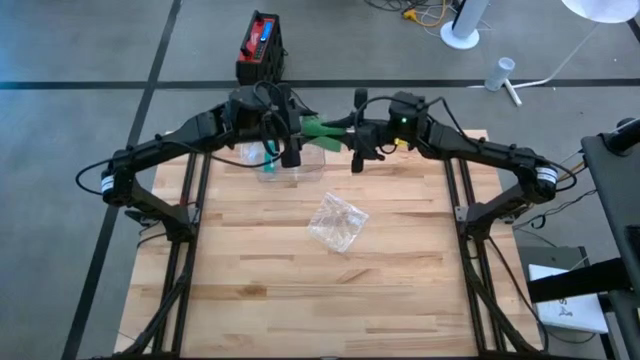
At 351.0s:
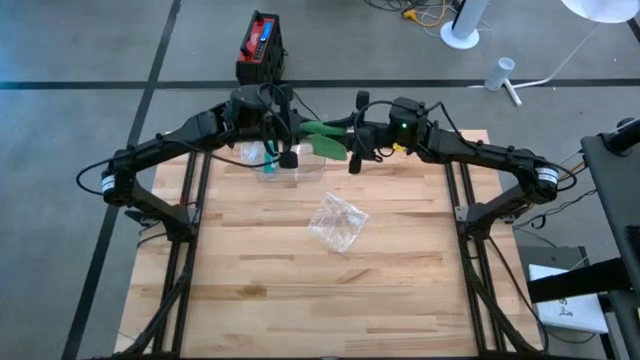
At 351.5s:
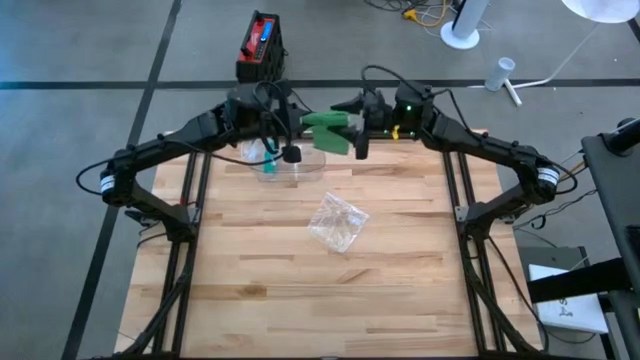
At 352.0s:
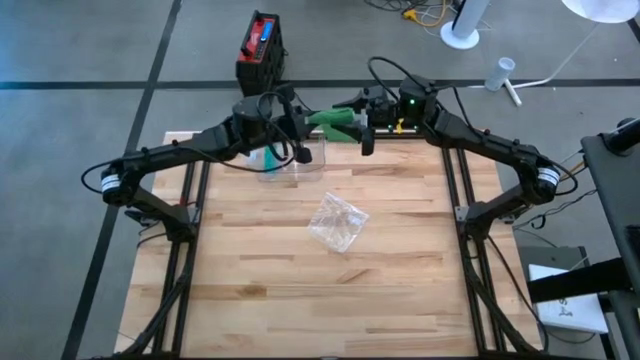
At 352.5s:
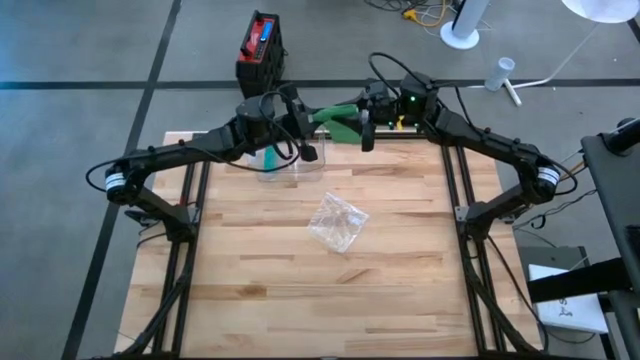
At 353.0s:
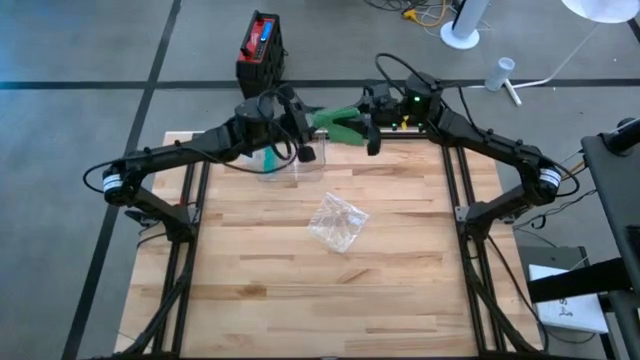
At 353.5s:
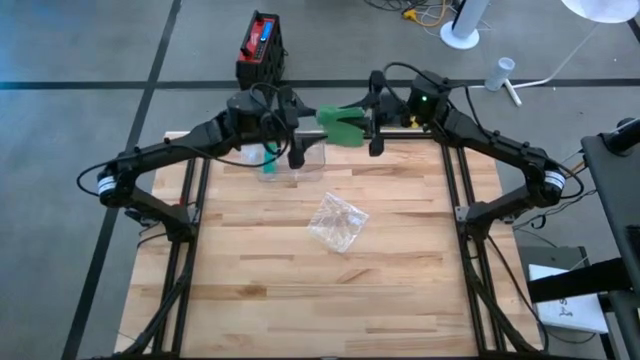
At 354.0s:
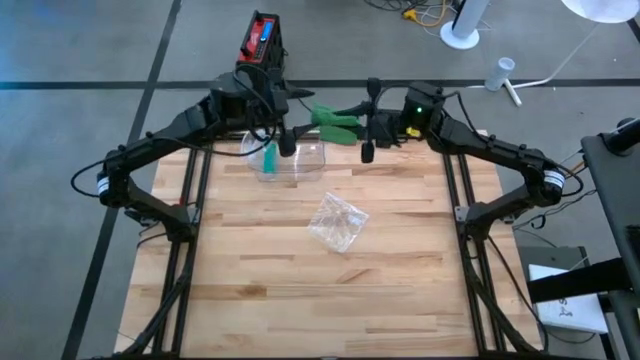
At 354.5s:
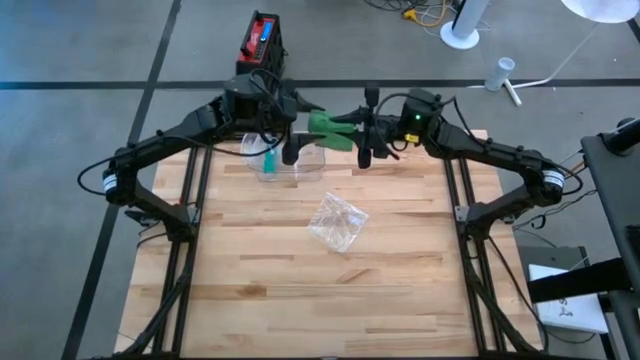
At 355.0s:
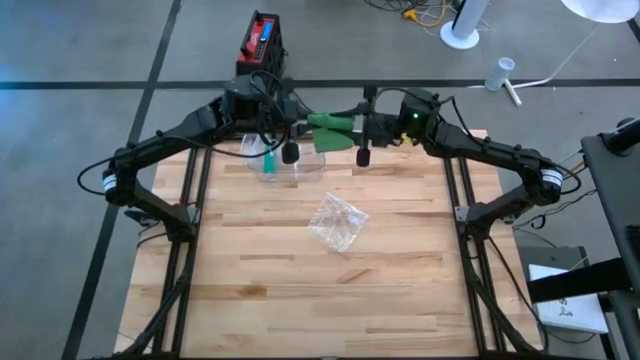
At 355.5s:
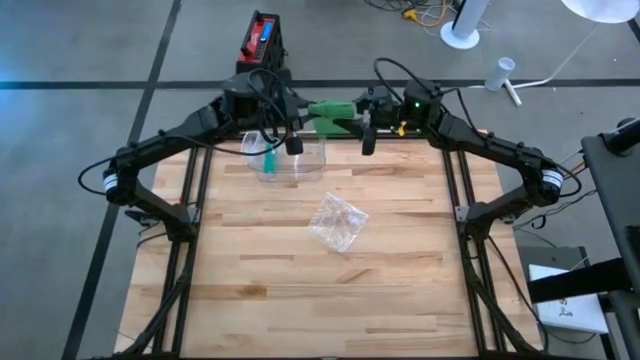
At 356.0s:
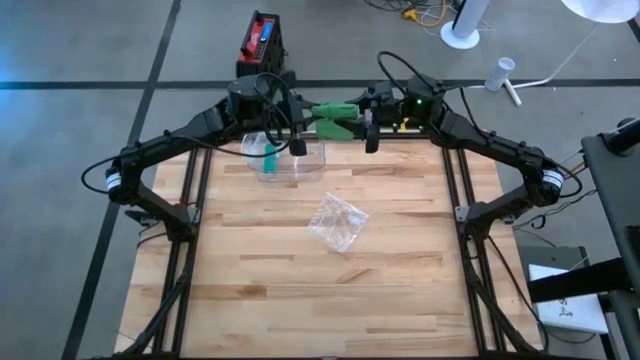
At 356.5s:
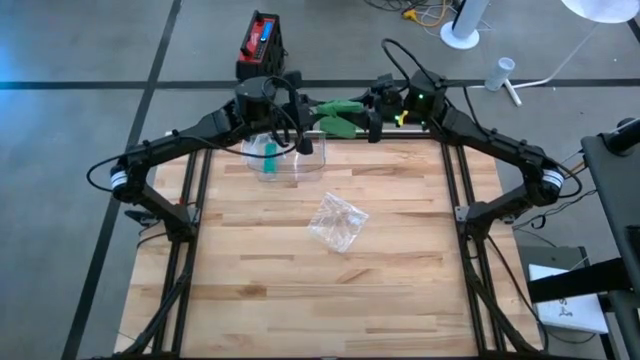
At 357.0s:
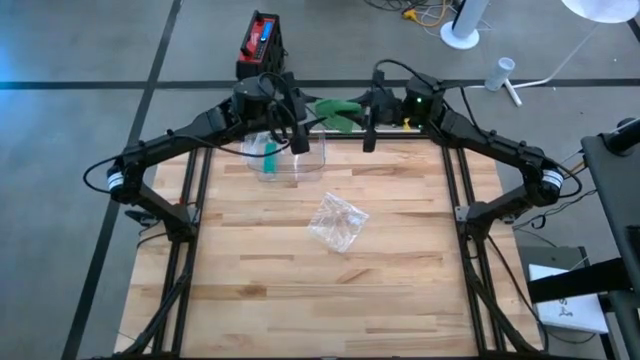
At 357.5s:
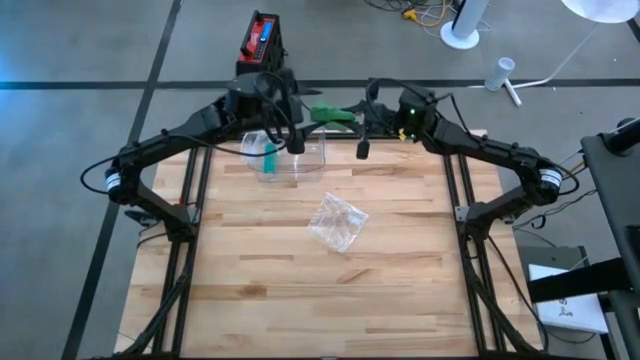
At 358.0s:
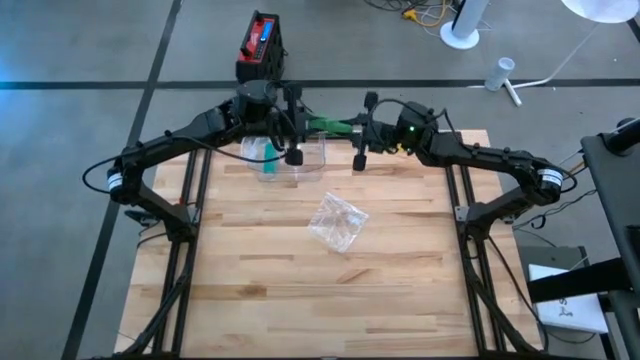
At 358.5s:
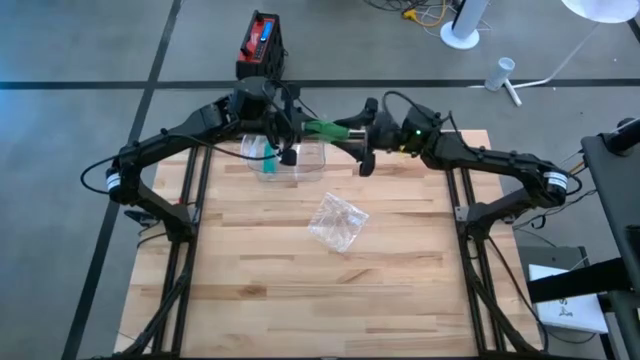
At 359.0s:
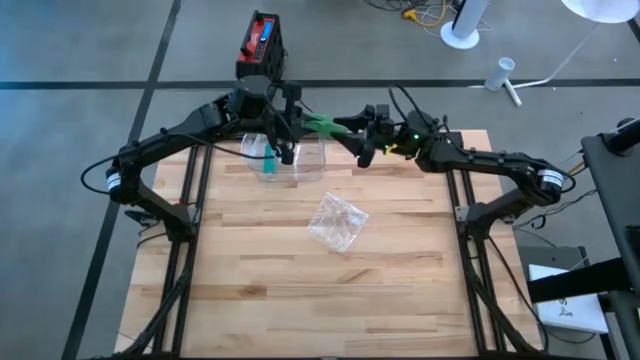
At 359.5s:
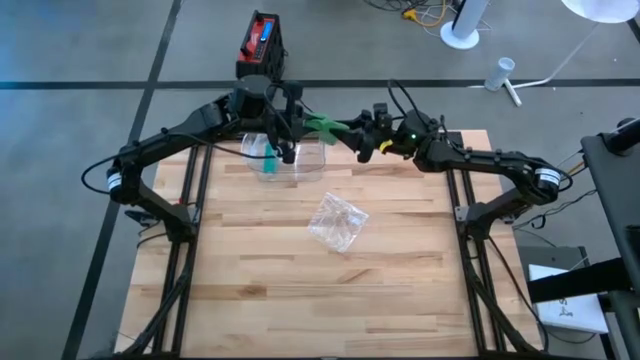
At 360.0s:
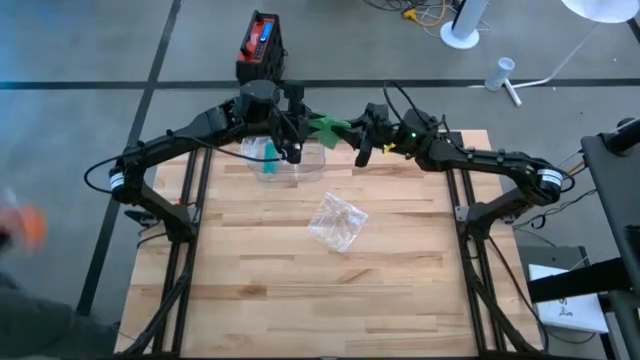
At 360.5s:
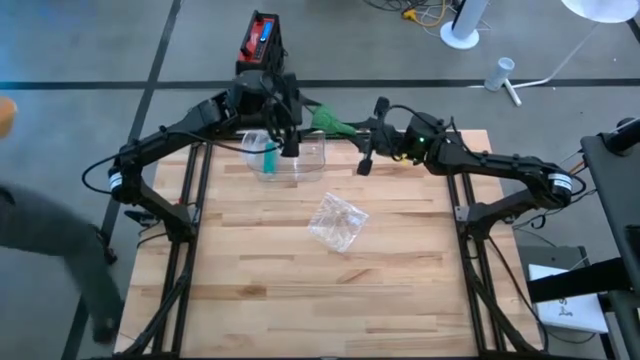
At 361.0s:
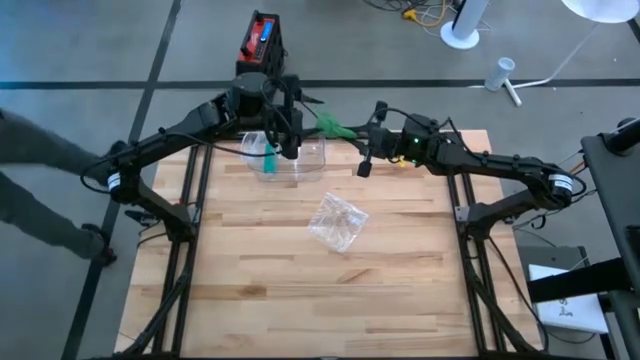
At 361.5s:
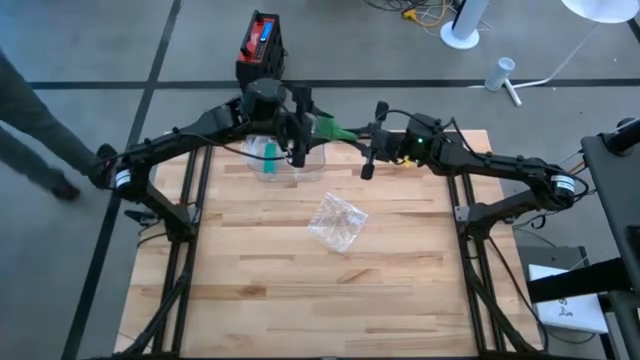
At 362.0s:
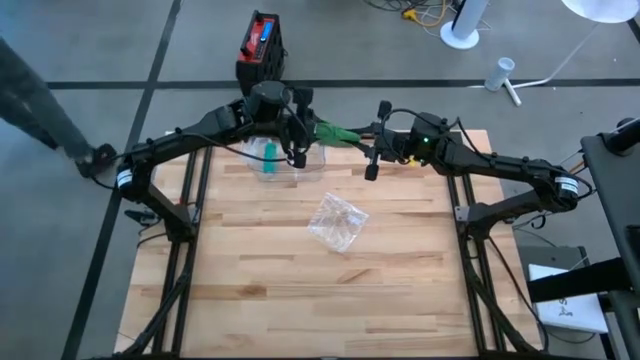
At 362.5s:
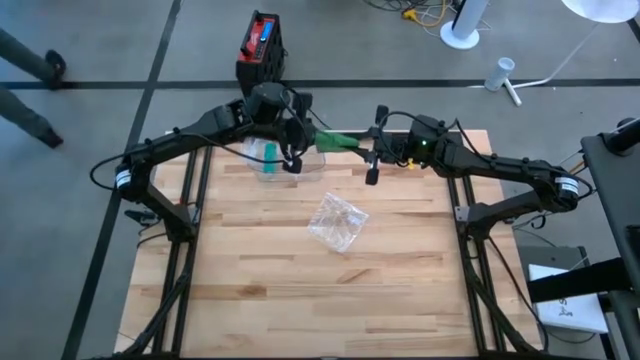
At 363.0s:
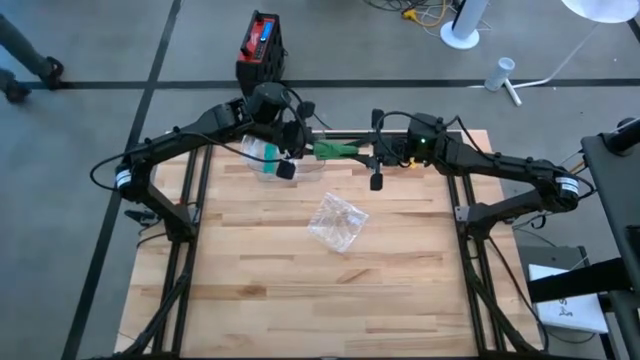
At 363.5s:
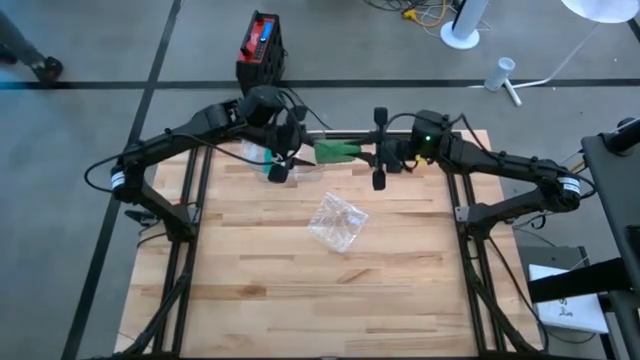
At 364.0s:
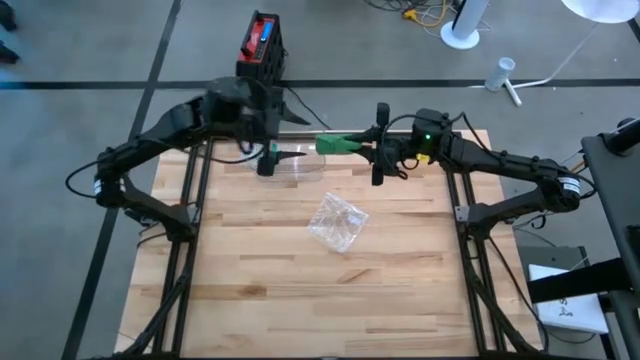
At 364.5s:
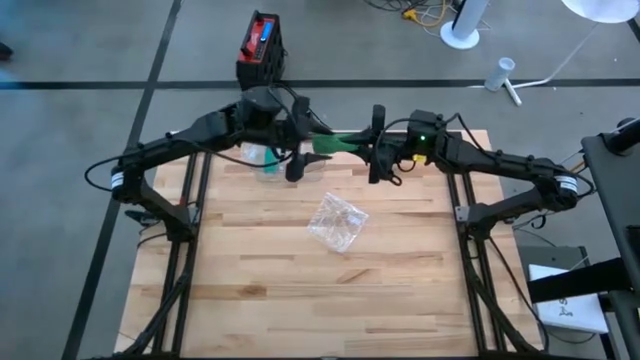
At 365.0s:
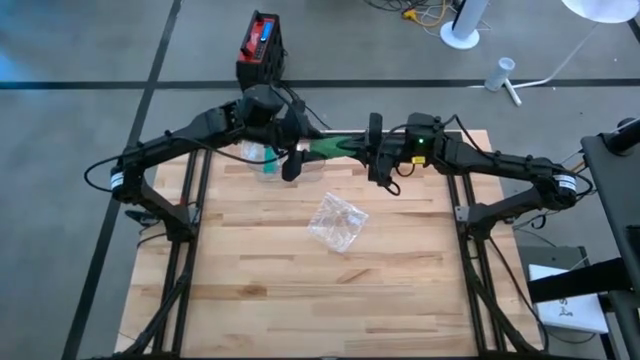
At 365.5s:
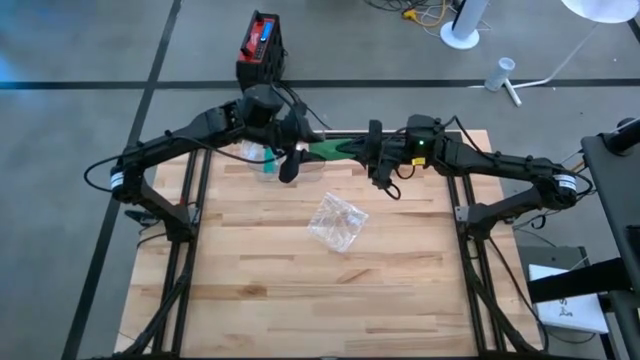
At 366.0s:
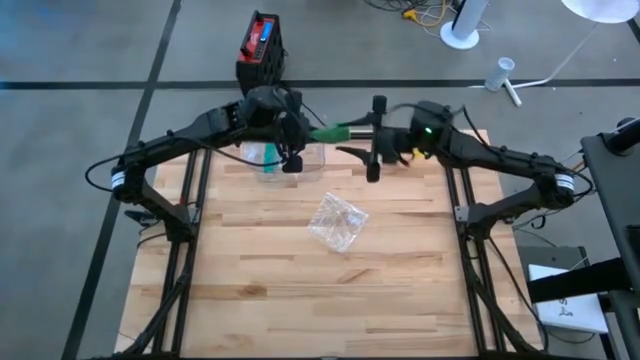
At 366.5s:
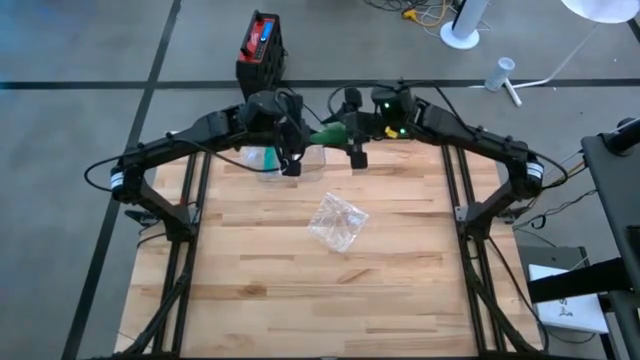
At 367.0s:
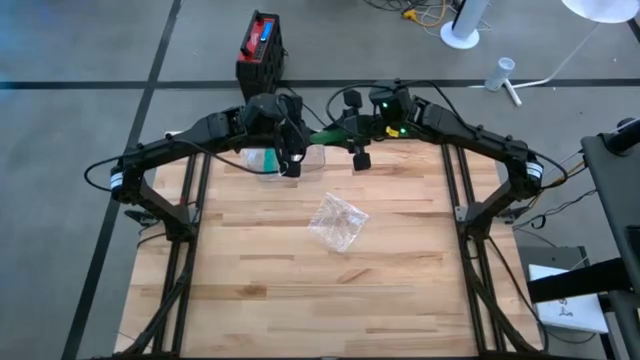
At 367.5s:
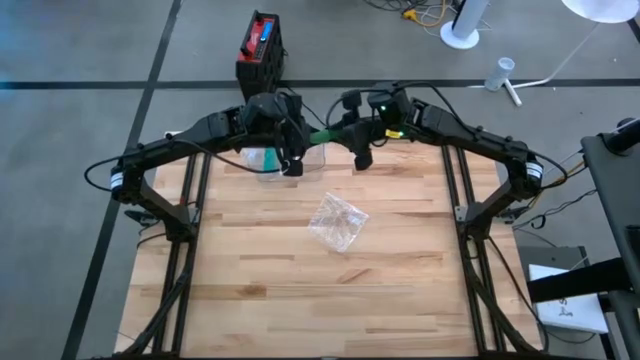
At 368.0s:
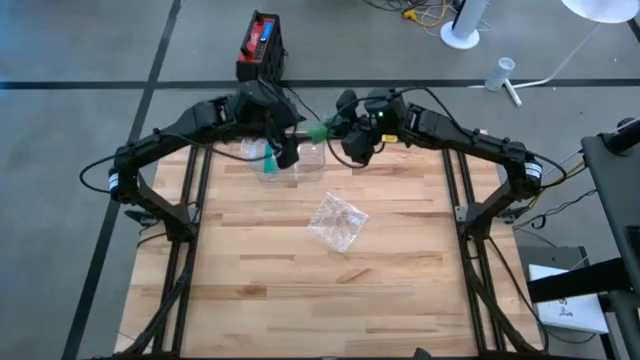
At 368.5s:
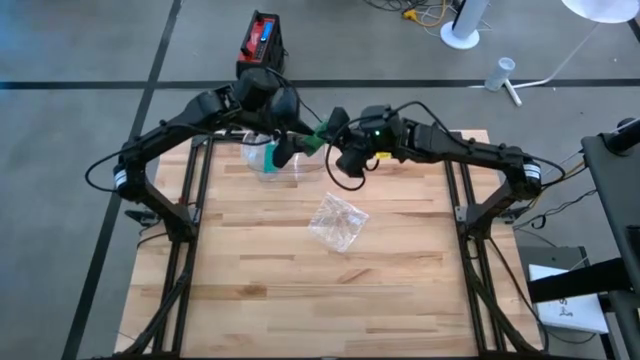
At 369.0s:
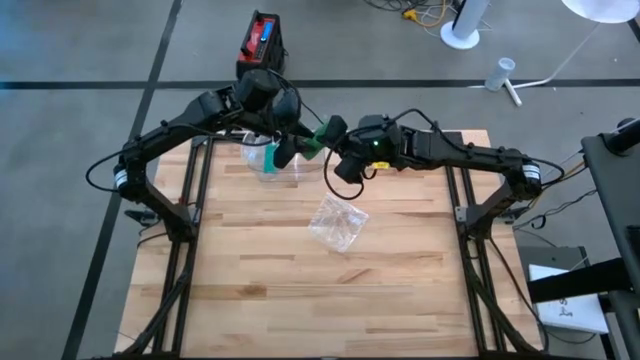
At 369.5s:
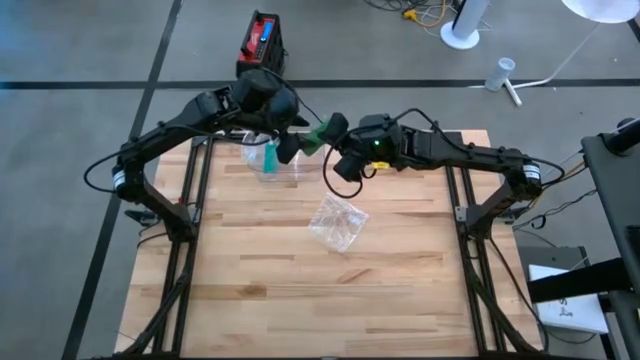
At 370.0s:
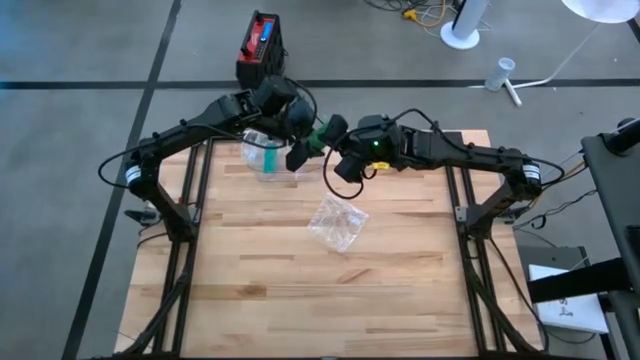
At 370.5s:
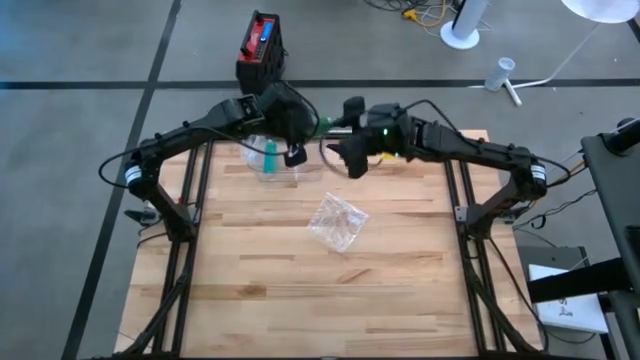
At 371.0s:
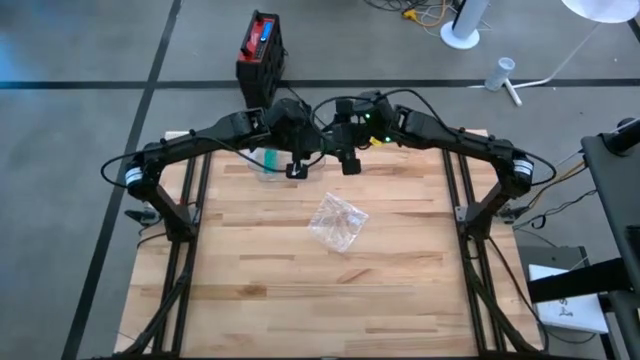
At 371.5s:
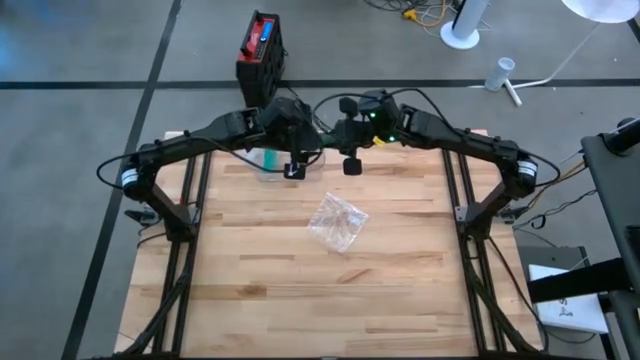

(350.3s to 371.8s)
Task: Roll bandage
Roll the green bandage
